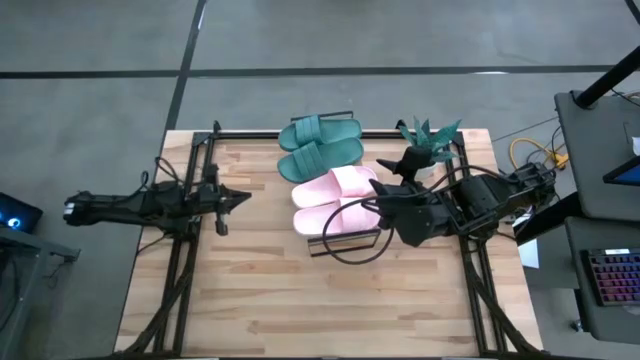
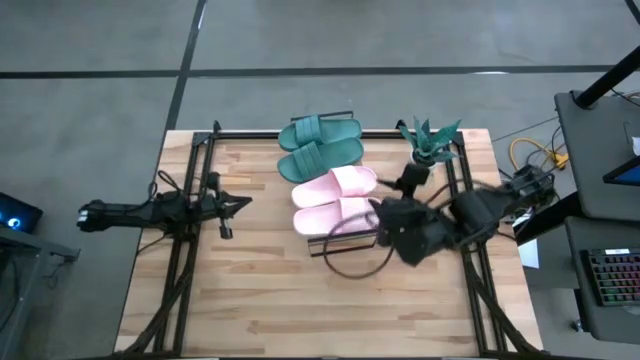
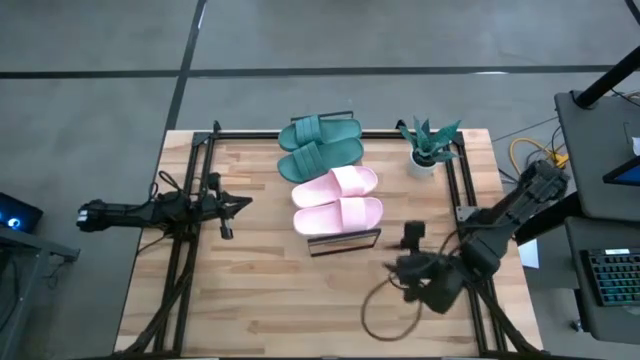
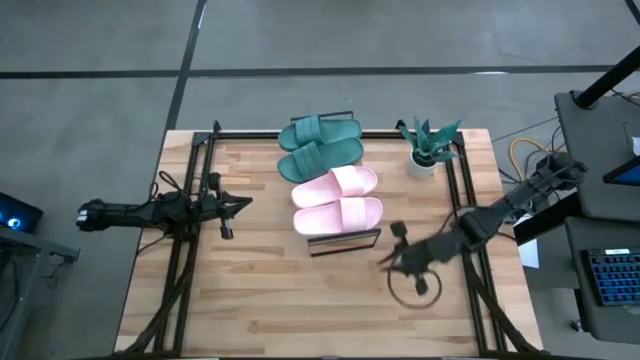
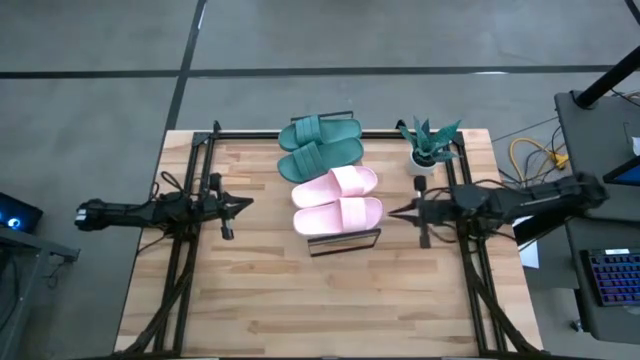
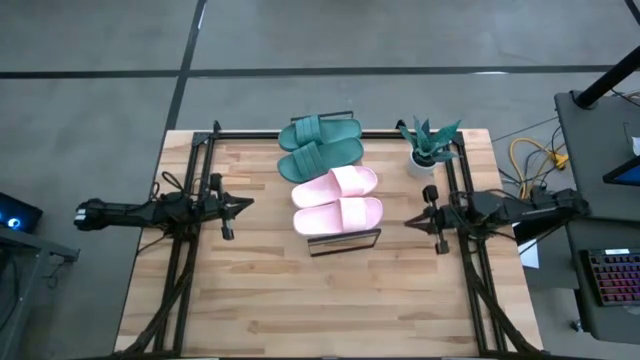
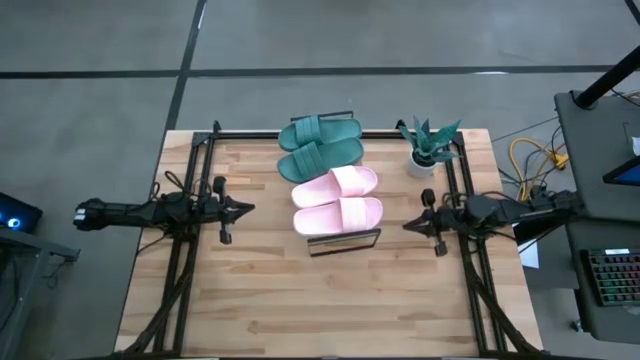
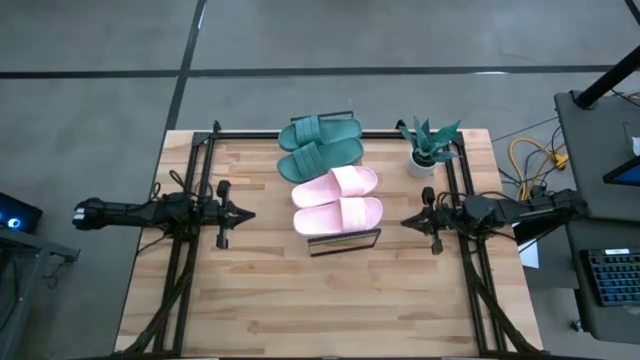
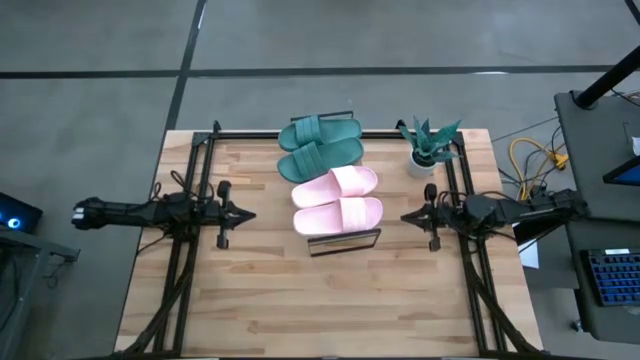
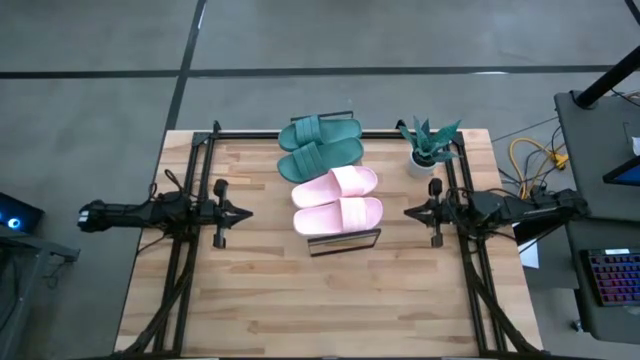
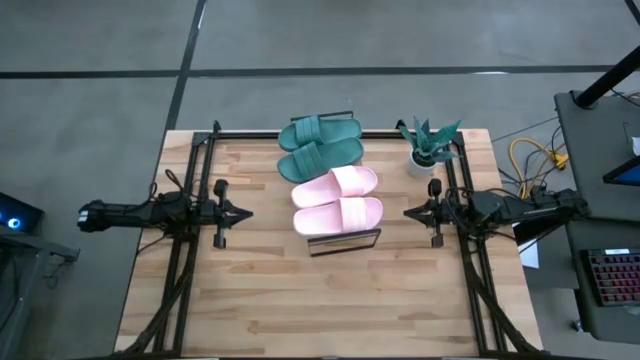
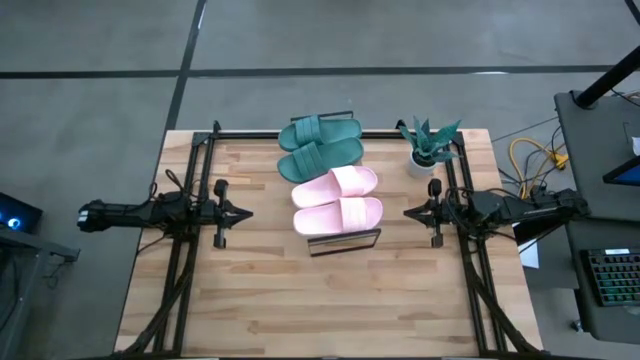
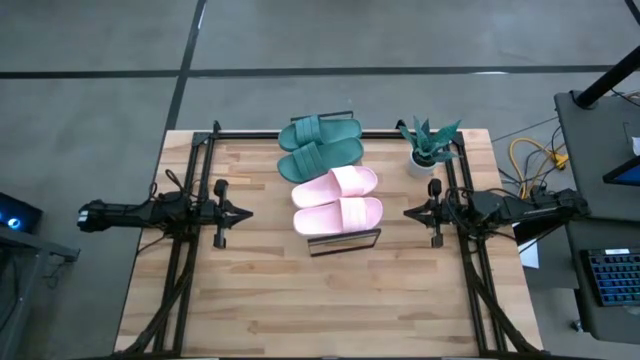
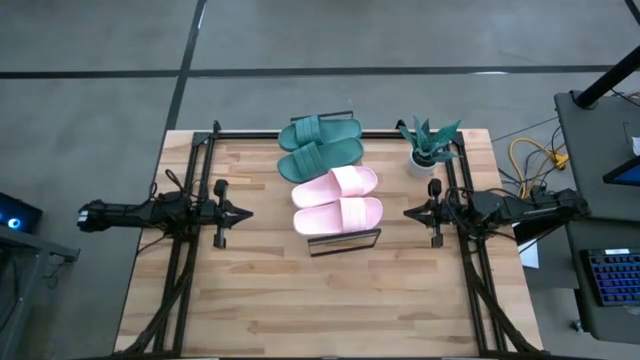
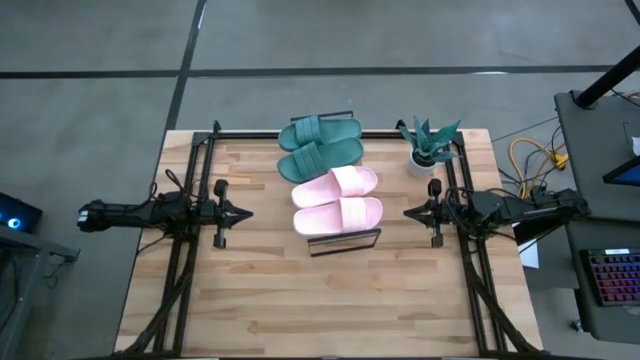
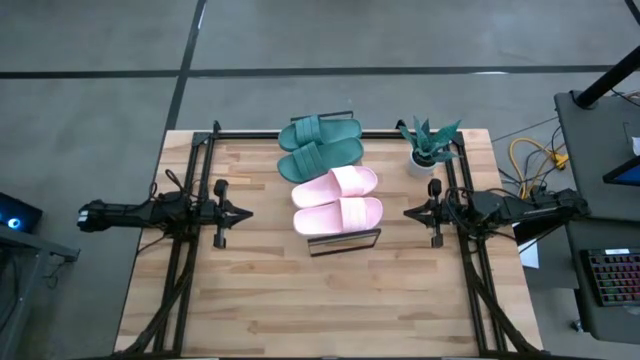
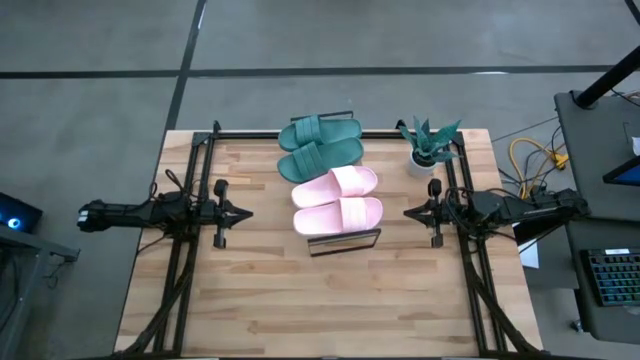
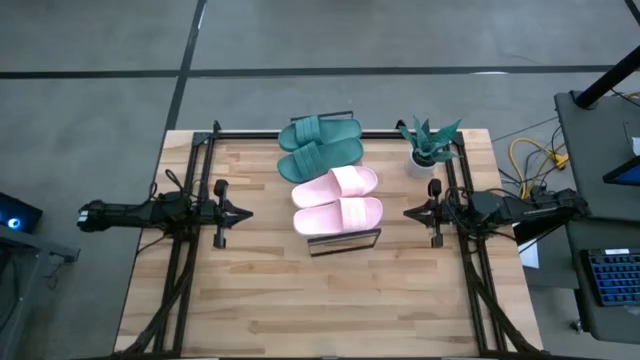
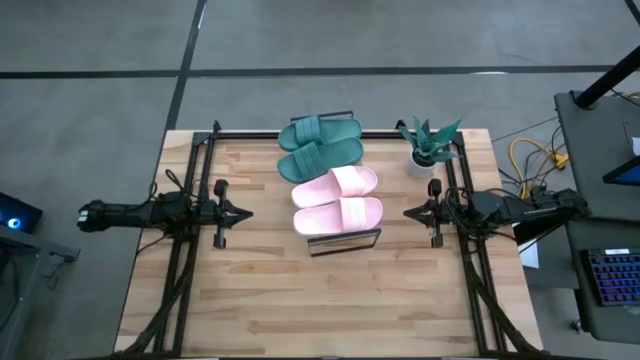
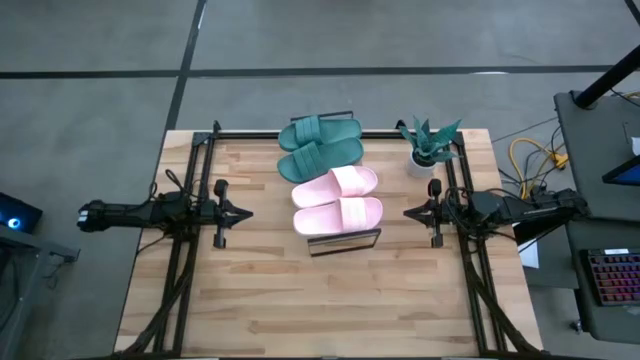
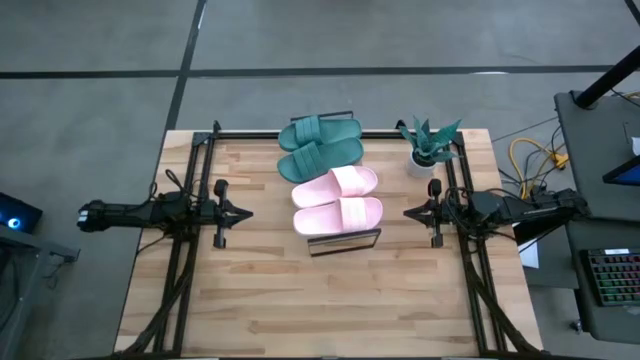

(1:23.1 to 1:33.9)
Task: Pick and place slides into the shelf
Return to Home Position

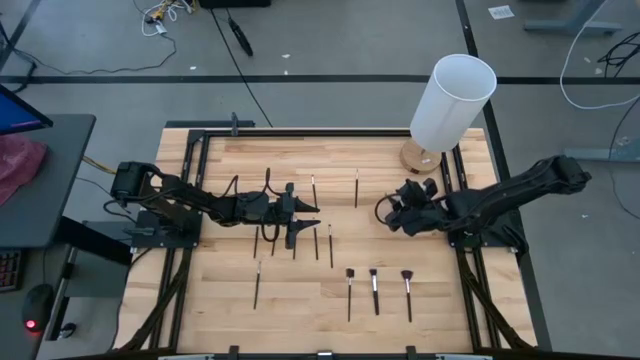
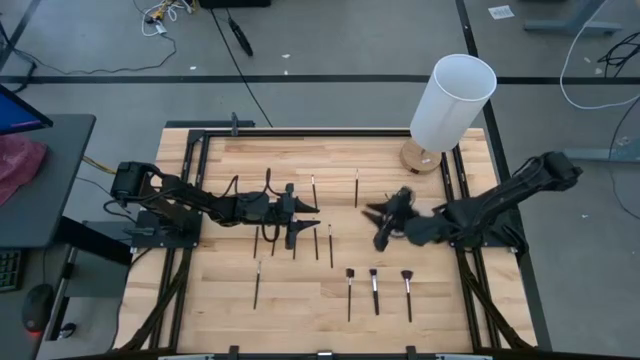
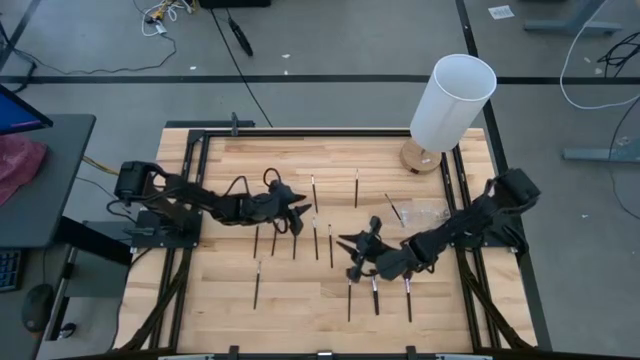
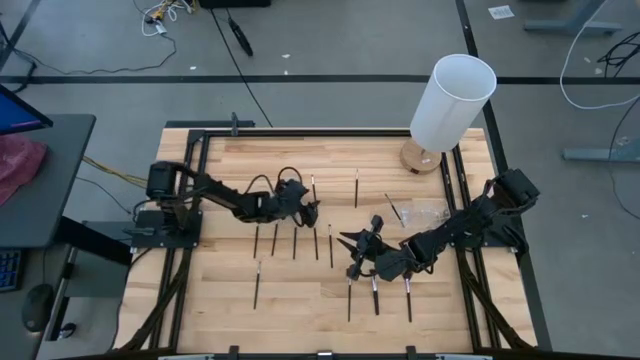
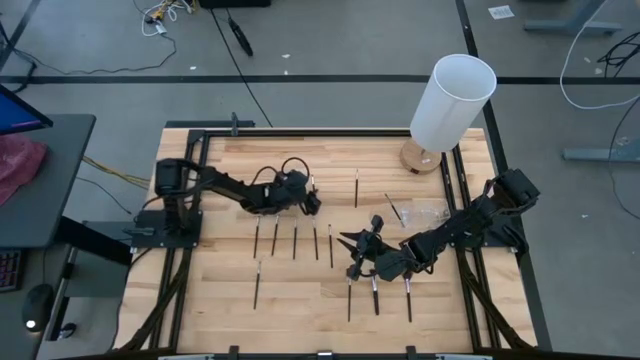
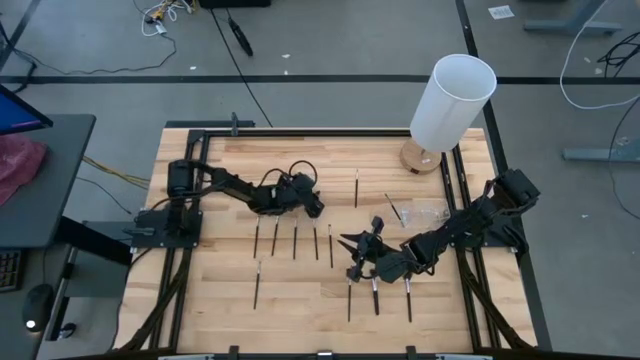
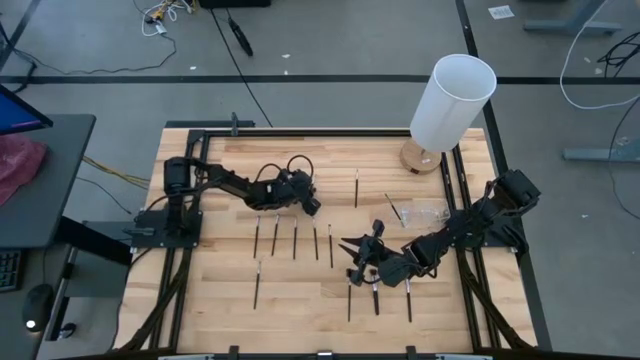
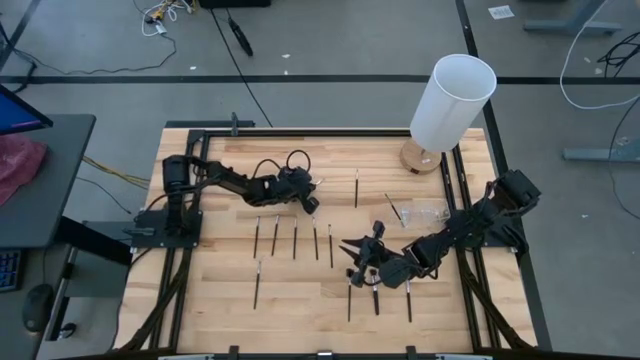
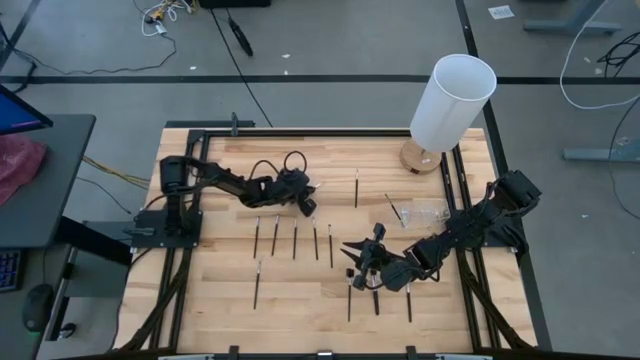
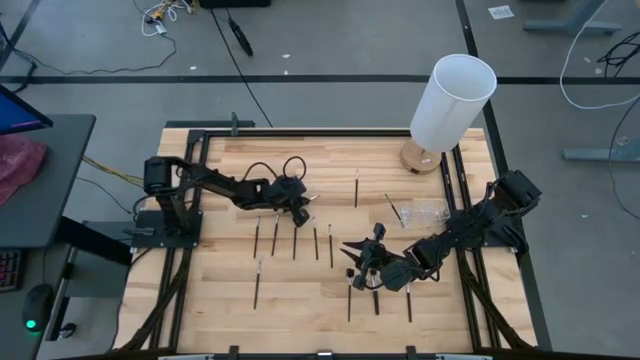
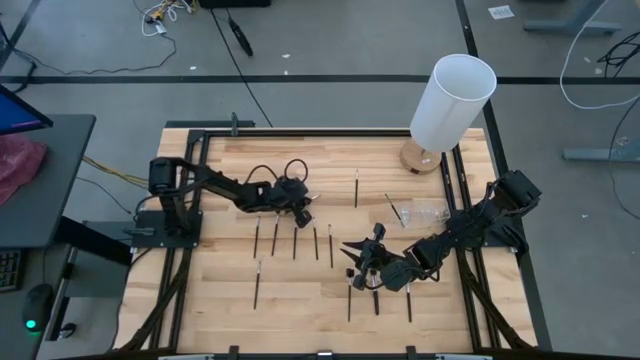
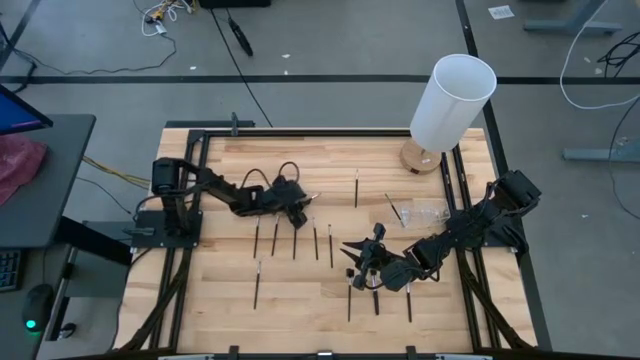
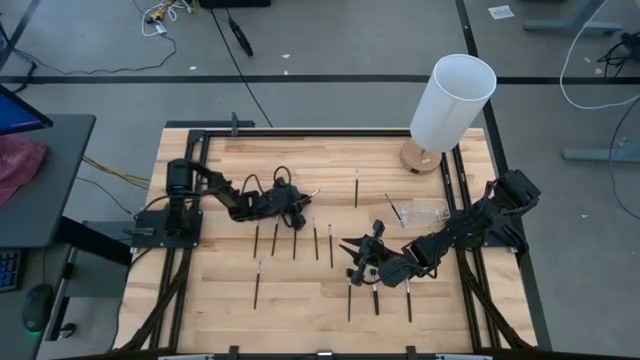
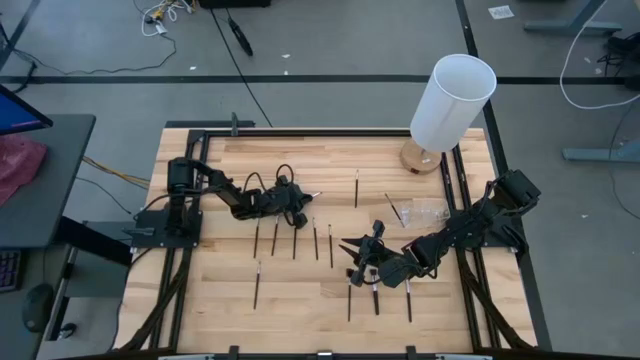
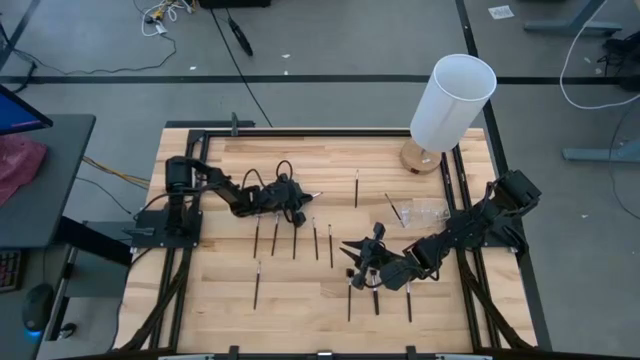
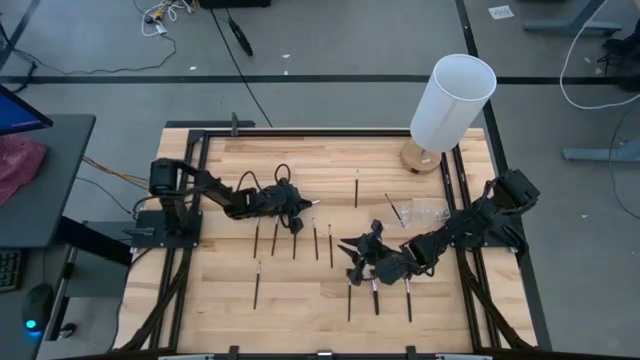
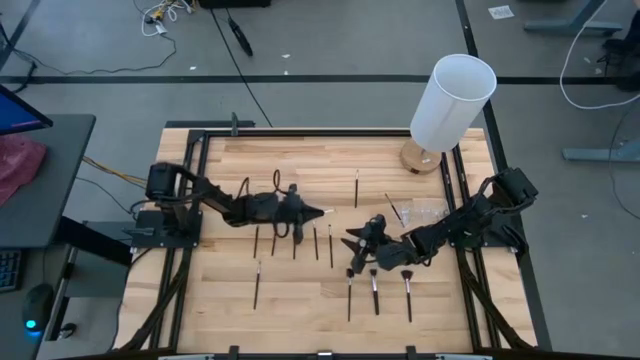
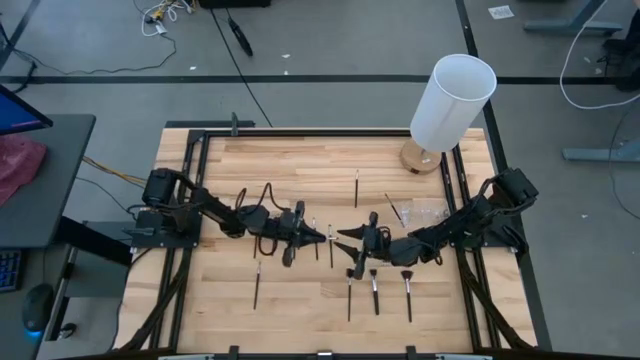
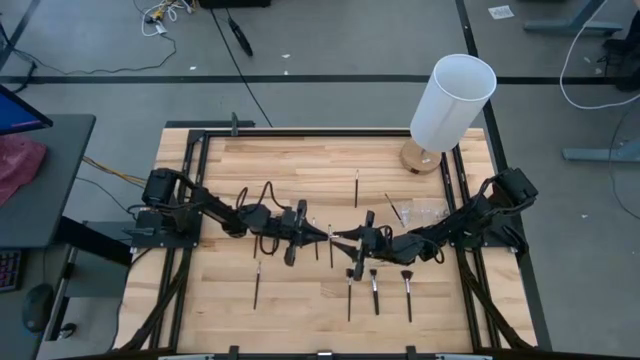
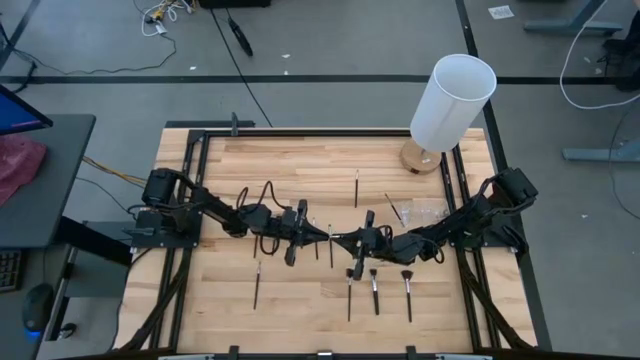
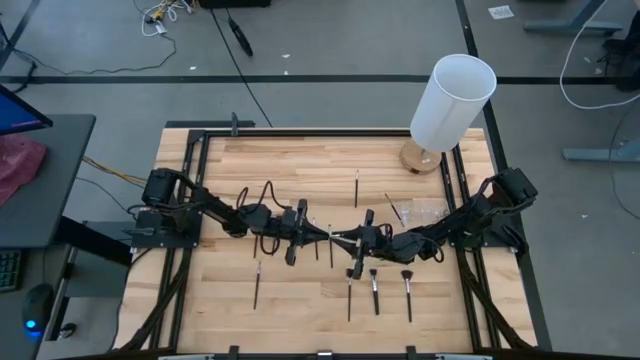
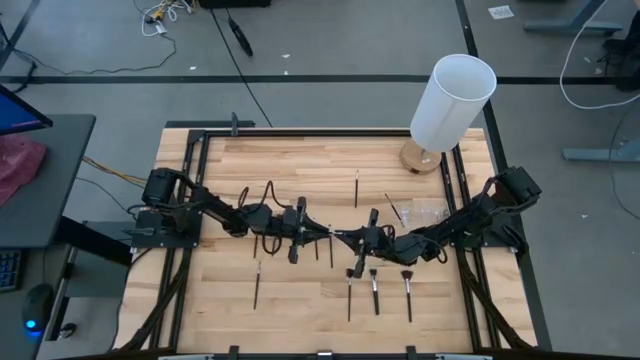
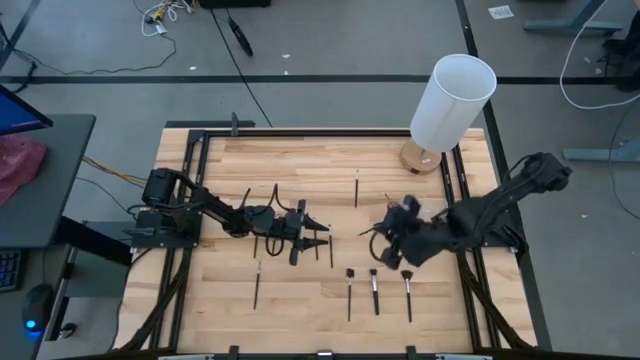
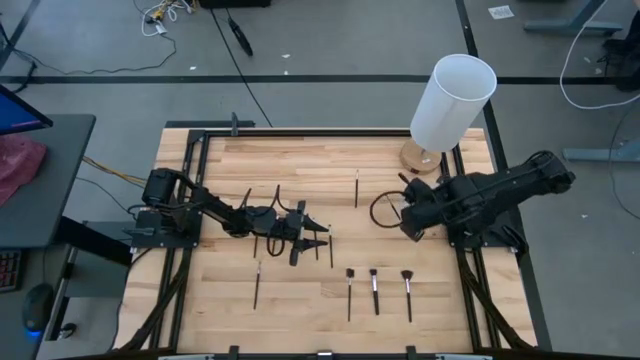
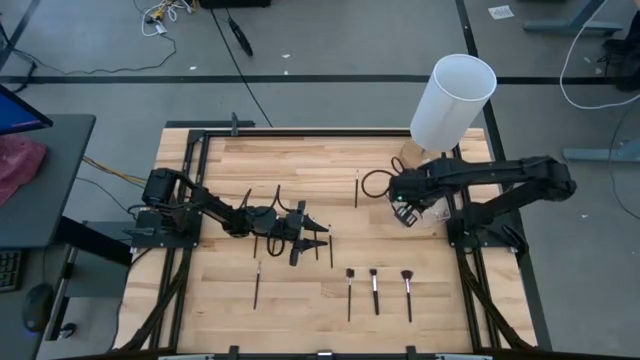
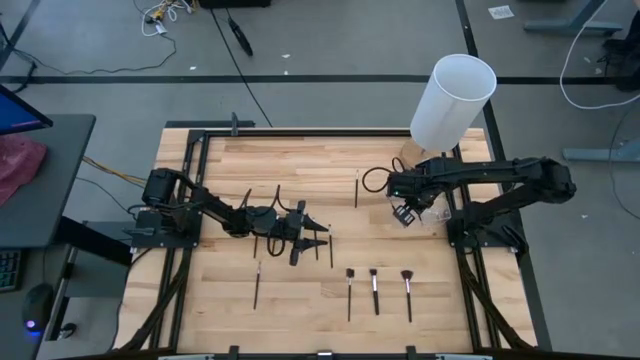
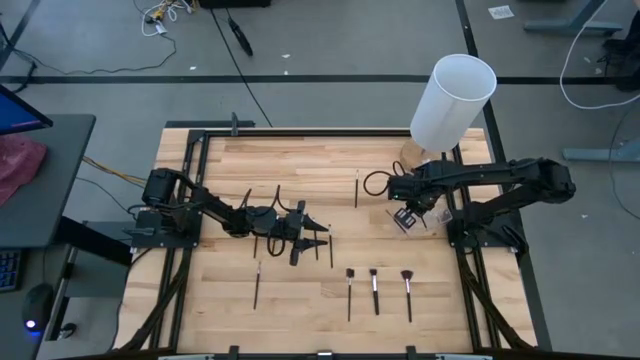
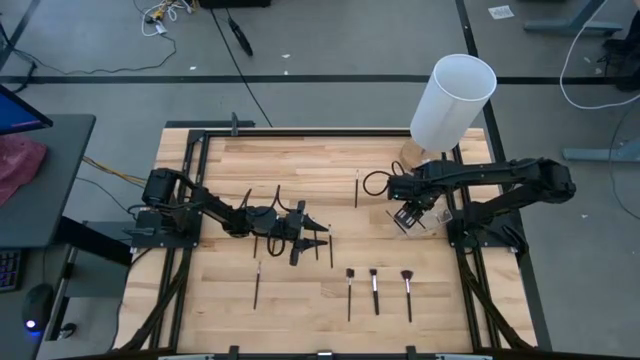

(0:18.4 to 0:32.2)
Task: Put items in baskets/containers
Put the black eyeshadow brush into the transparent organizer
